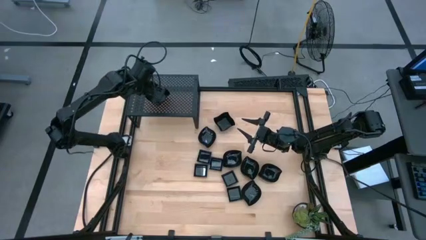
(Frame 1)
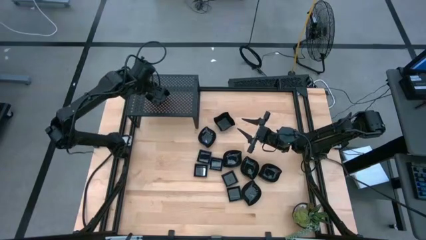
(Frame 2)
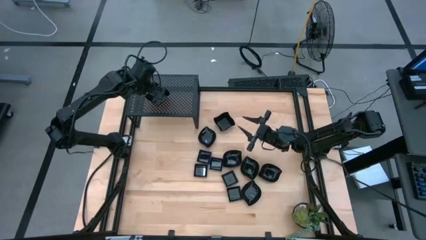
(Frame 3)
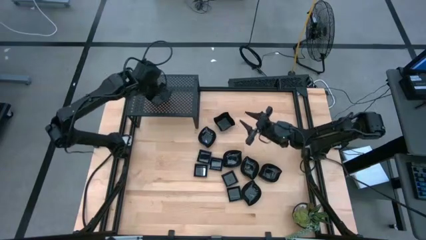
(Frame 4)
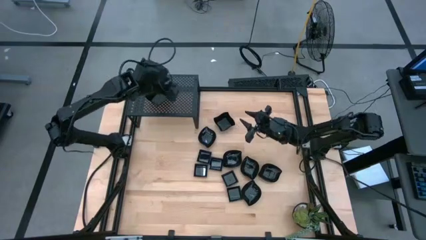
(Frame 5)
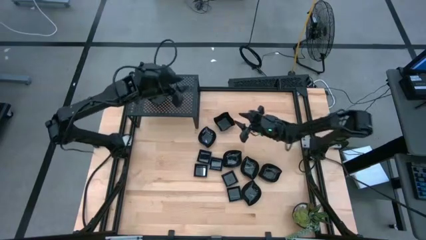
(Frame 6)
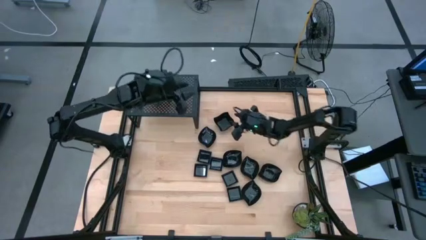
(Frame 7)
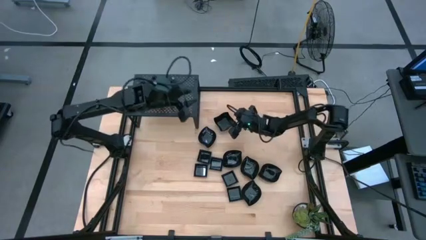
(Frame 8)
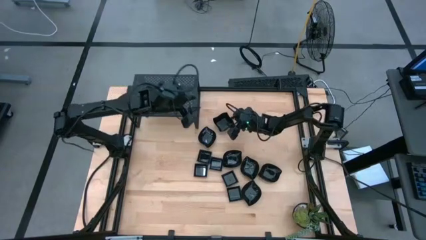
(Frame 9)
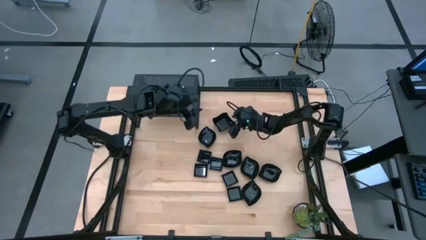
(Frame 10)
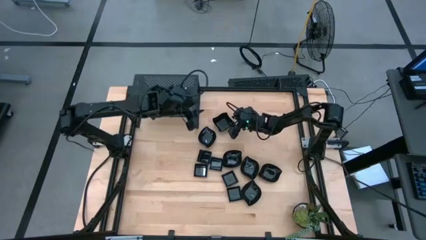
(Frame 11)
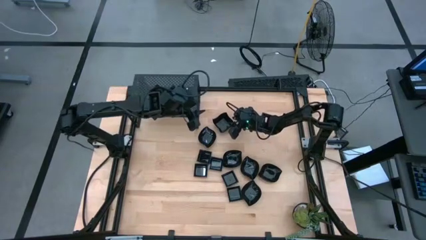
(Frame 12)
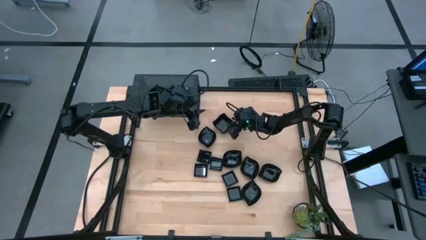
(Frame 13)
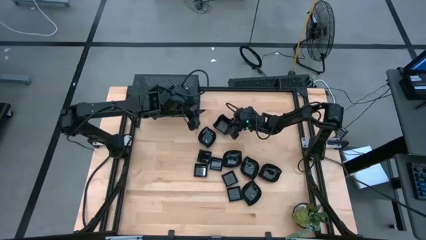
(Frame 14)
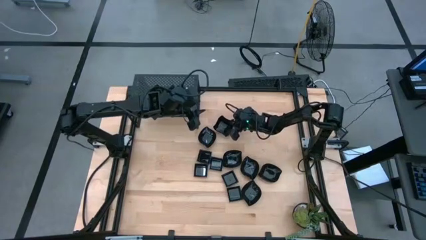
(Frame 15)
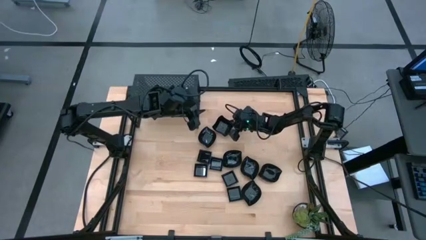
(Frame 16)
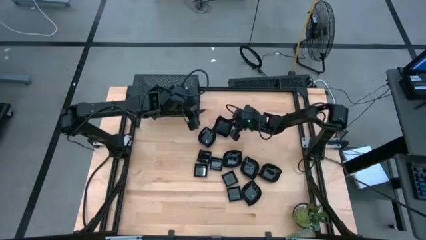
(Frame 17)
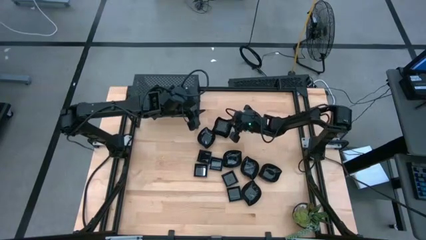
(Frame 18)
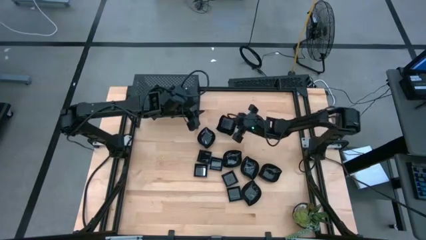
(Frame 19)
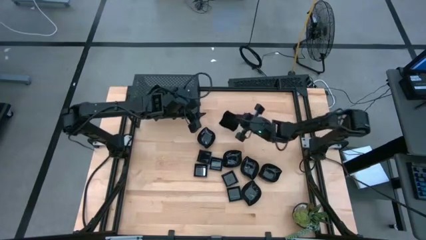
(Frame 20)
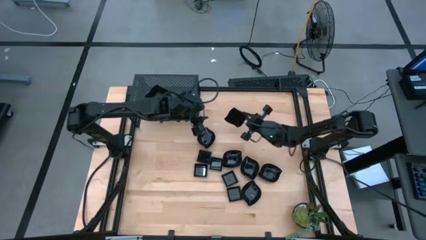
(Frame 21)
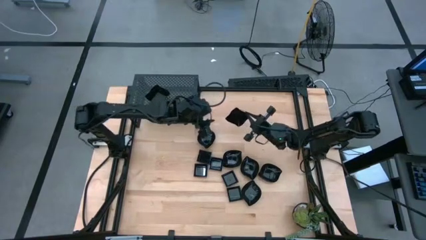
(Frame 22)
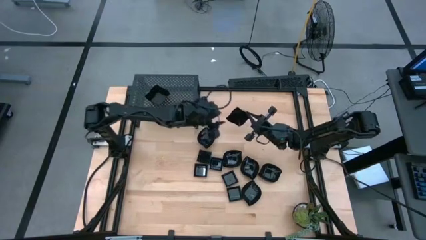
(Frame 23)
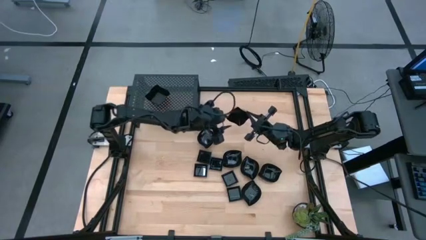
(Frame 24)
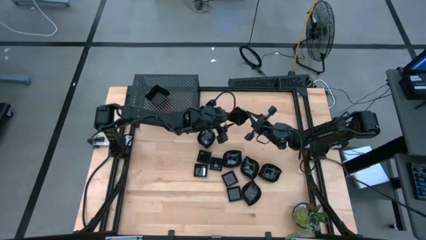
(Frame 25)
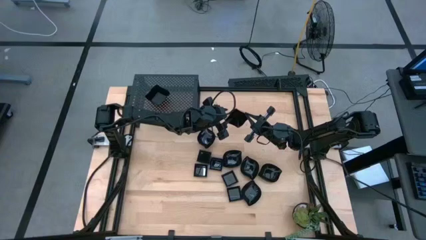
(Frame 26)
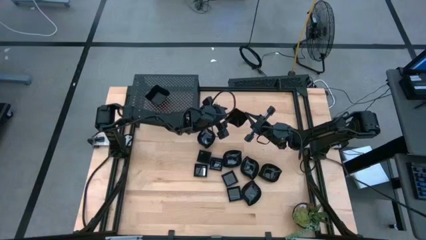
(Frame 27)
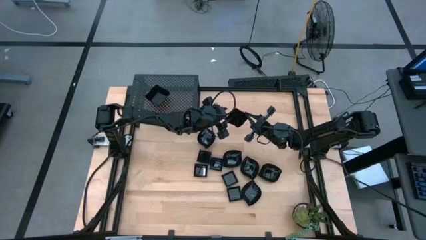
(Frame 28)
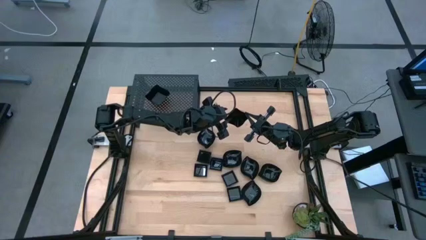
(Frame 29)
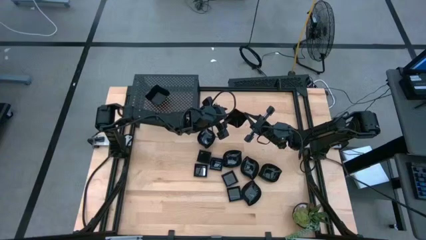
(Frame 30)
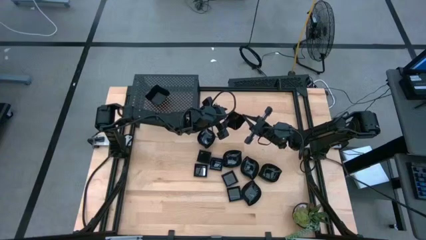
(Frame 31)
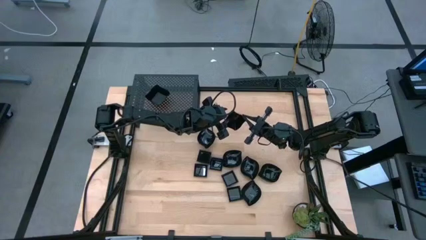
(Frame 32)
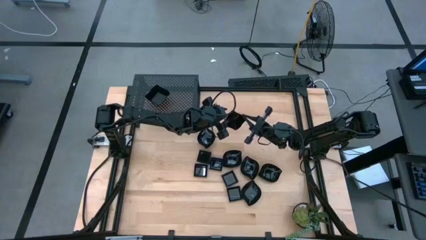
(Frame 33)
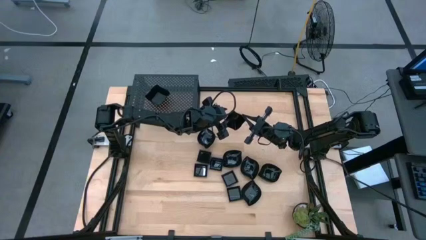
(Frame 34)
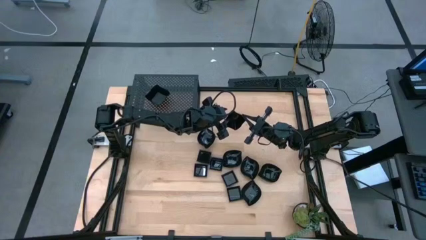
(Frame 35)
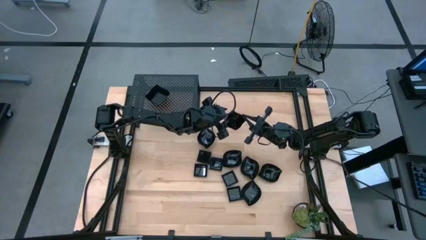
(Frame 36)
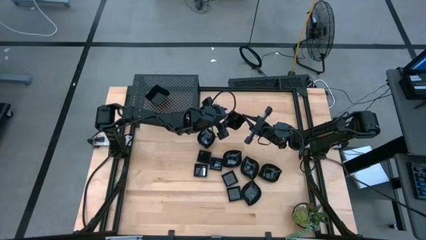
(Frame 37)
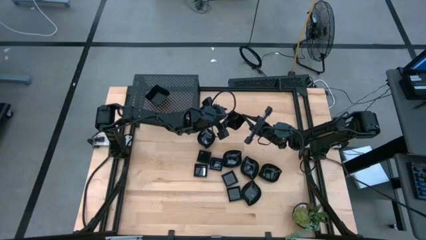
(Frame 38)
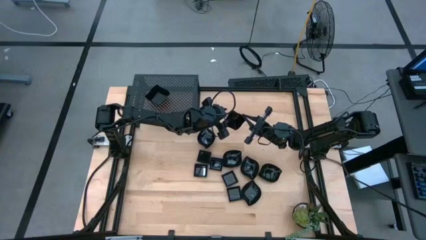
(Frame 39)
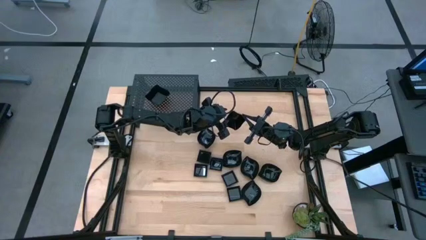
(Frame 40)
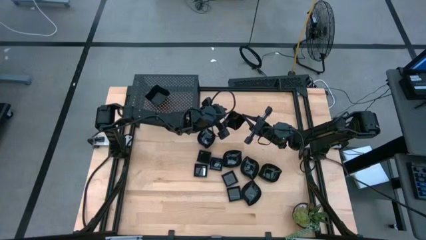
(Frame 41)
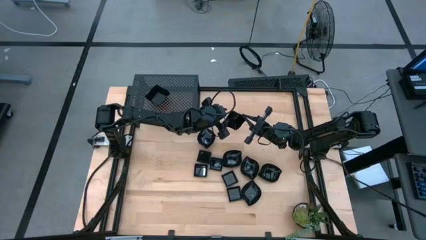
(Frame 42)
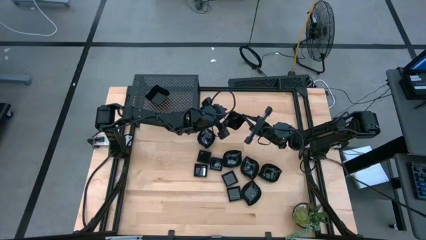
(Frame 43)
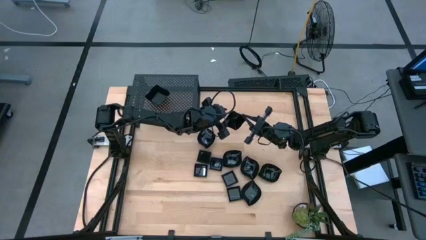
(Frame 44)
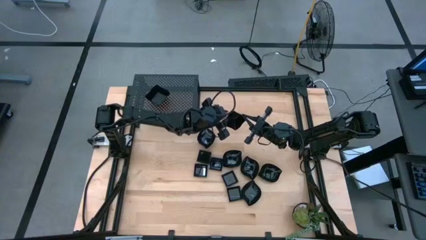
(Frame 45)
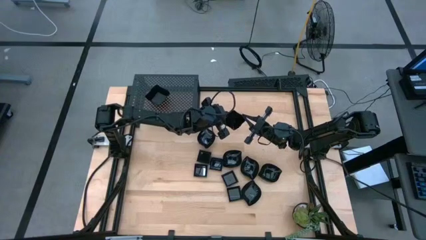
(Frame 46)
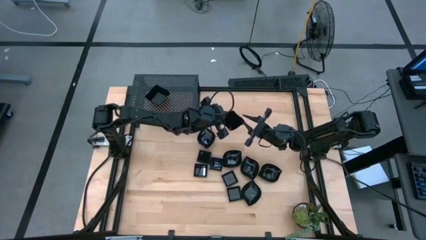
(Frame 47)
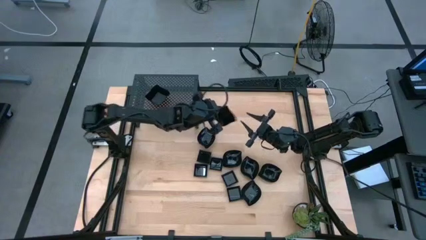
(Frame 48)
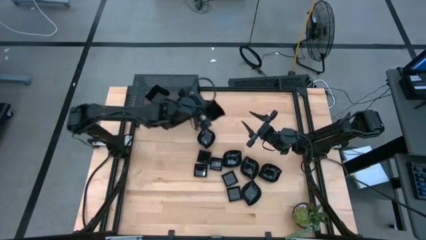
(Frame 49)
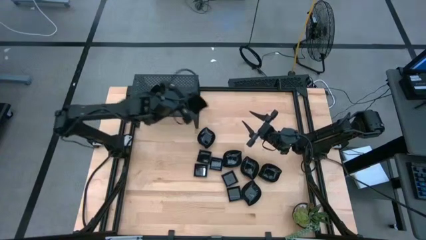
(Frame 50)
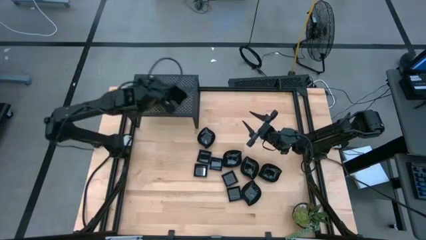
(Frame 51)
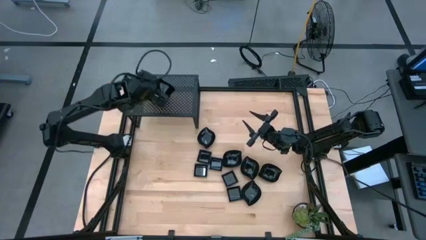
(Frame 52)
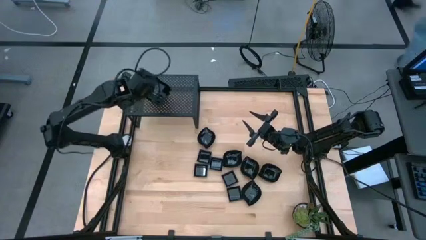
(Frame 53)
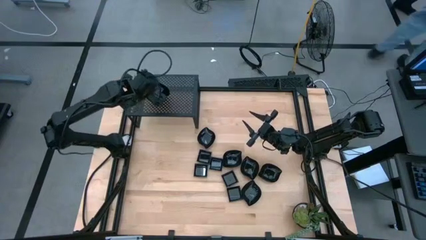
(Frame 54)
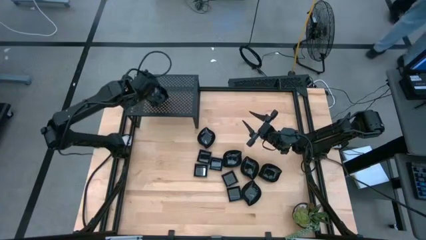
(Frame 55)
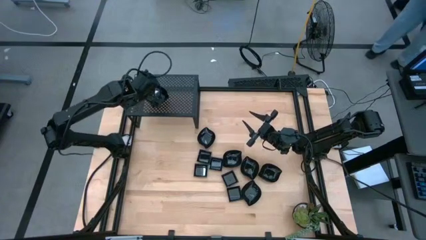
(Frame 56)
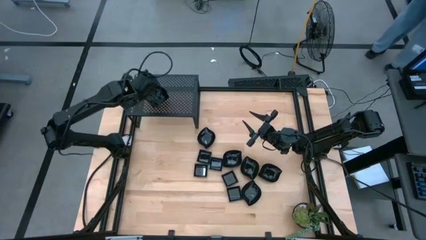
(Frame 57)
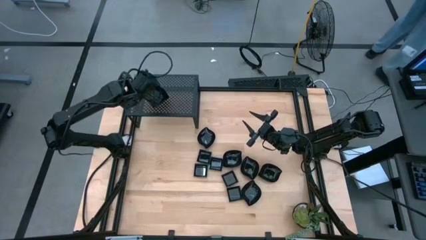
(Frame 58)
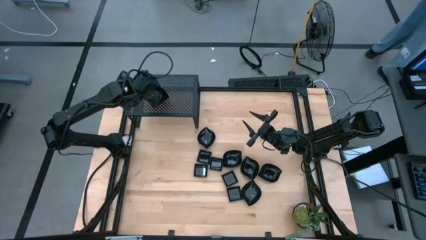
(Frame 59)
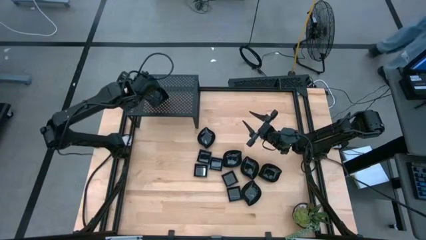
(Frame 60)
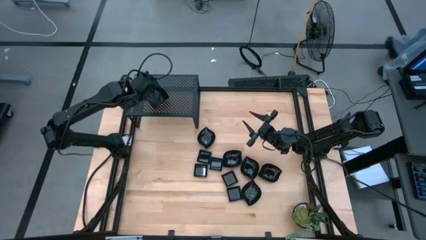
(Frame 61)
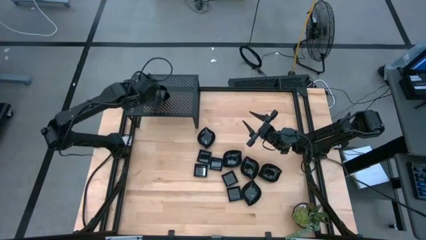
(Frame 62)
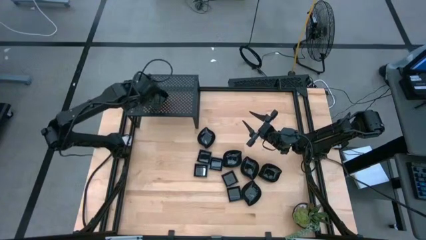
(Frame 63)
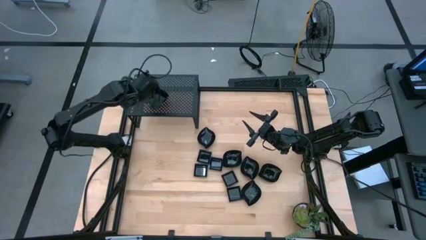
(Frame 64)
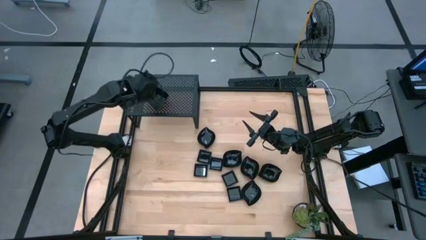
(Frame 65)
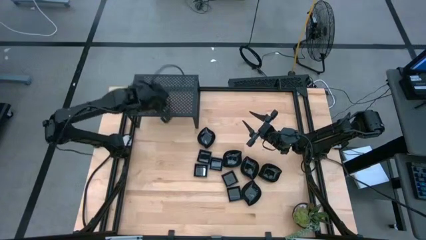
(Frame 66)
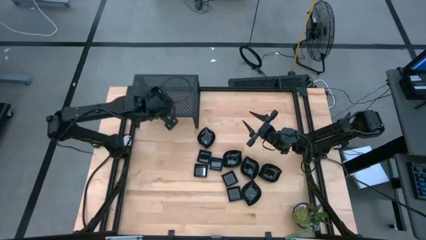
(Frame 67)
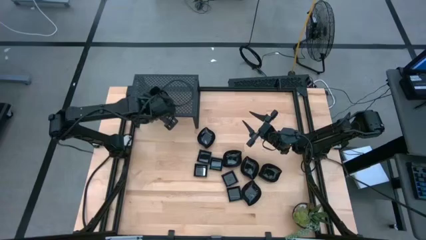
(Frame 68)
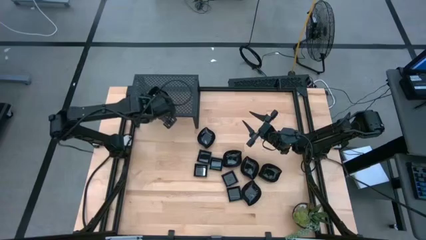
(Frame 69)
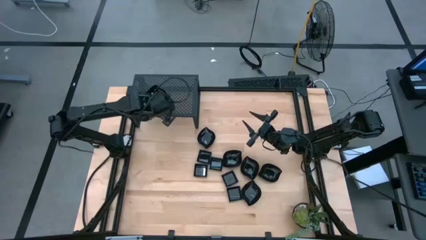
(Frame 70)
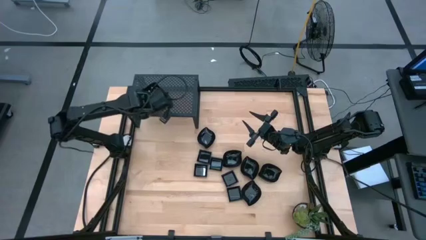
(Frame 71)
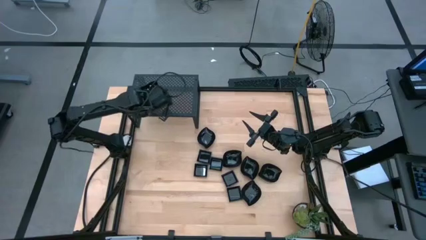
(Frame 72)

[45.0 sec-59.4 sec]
Task: Pick & Place Mini shaped plates
Stack the distorted square plate on top of the distorted square plate on the shelf
